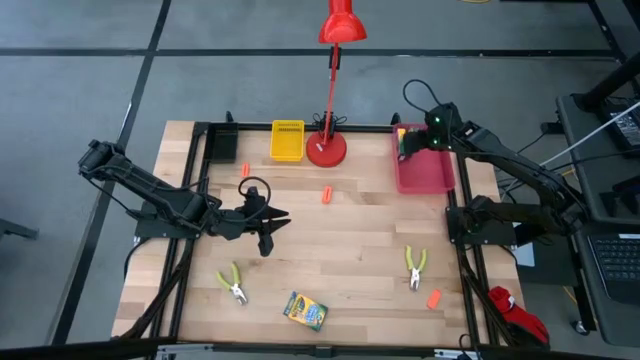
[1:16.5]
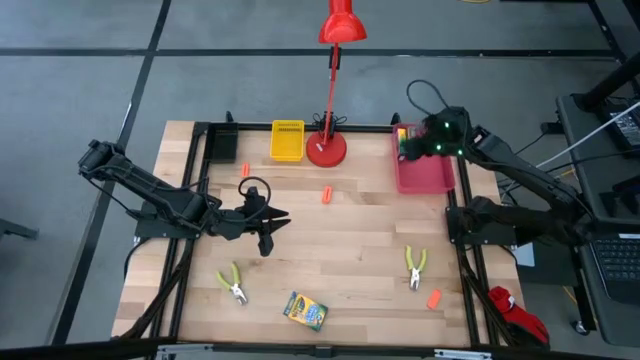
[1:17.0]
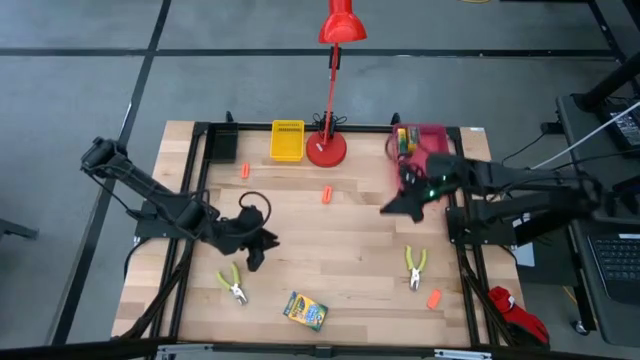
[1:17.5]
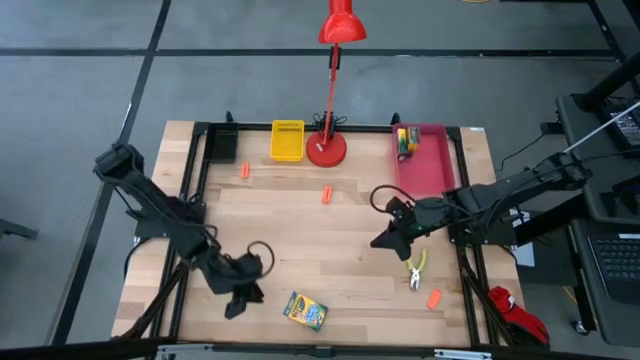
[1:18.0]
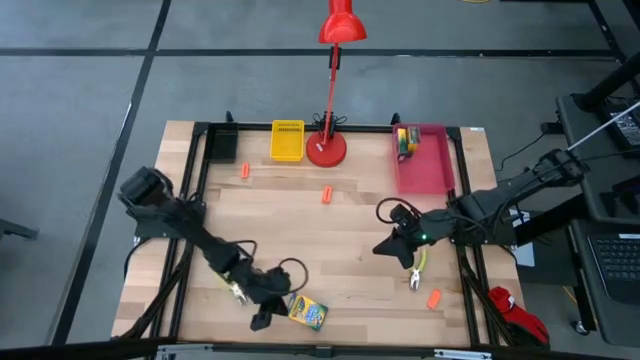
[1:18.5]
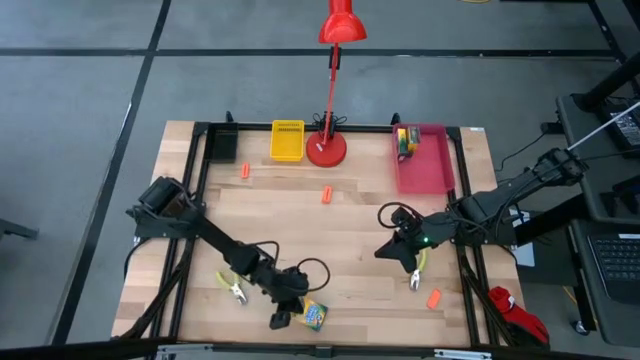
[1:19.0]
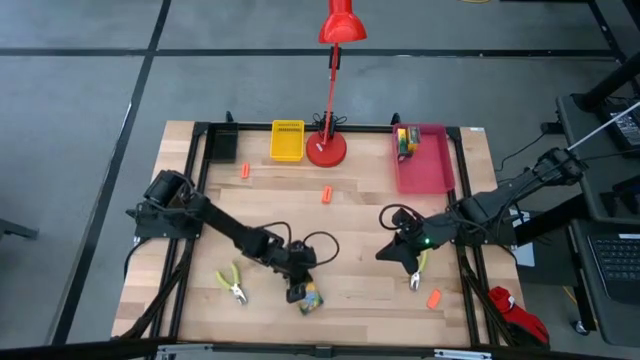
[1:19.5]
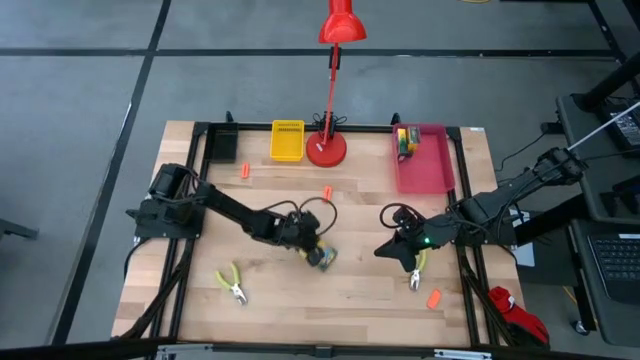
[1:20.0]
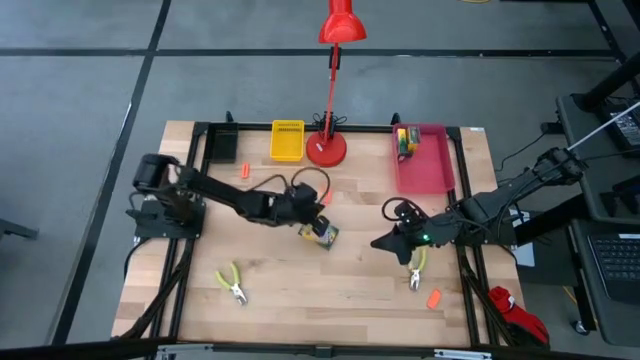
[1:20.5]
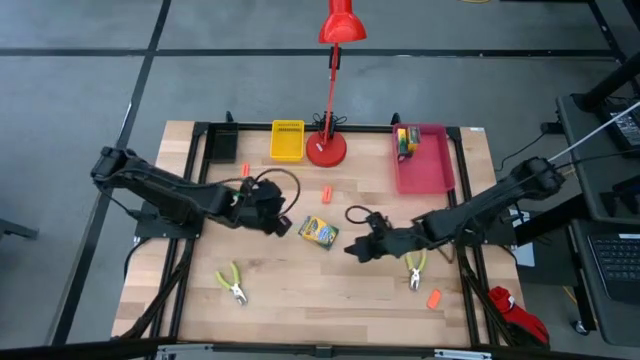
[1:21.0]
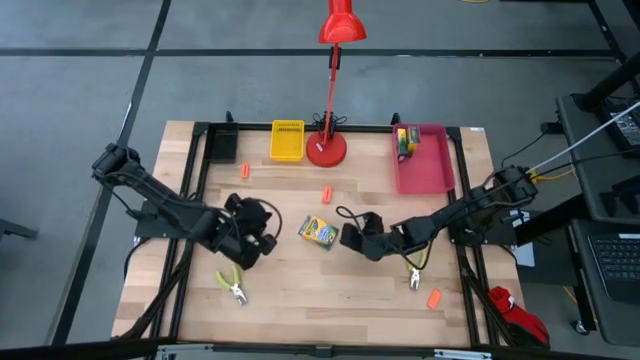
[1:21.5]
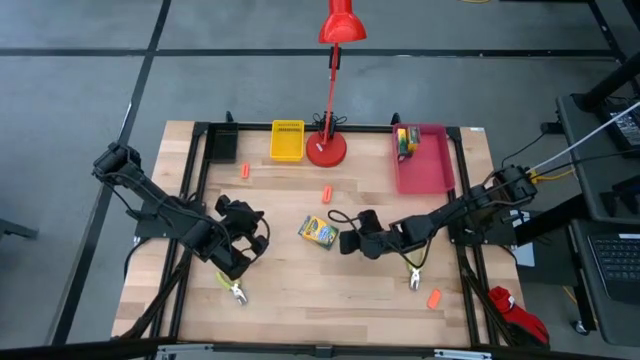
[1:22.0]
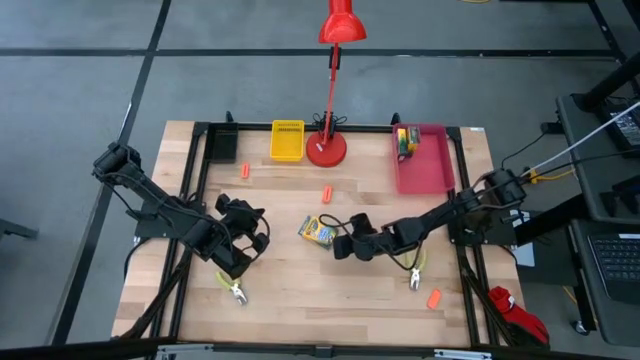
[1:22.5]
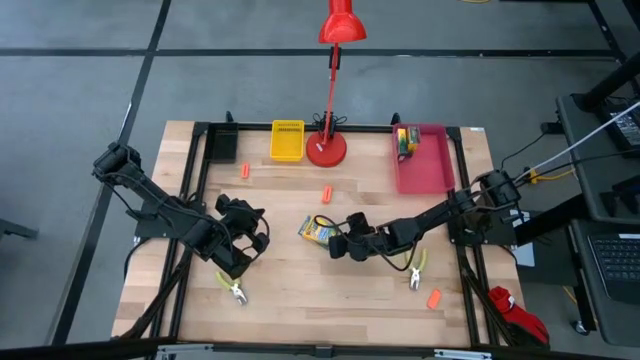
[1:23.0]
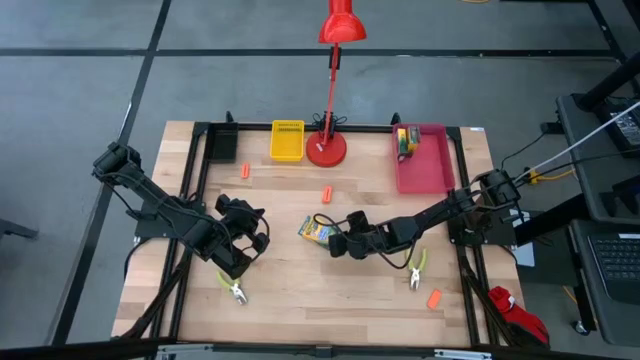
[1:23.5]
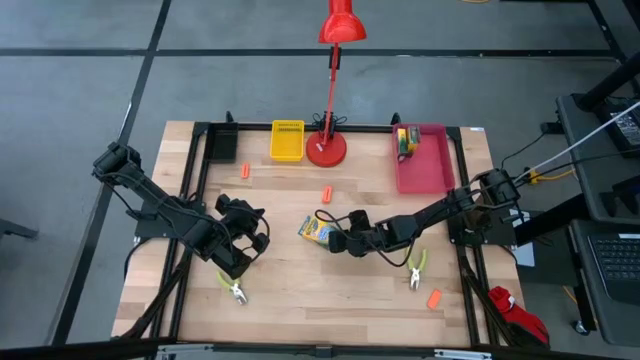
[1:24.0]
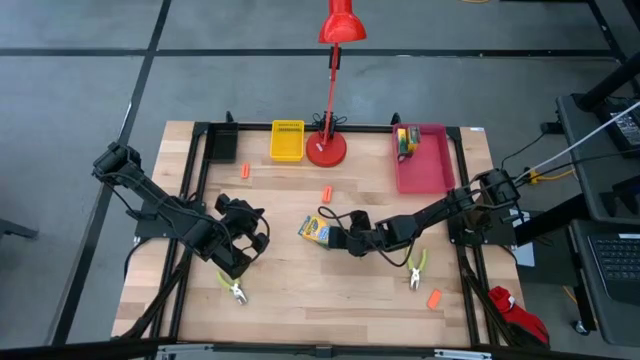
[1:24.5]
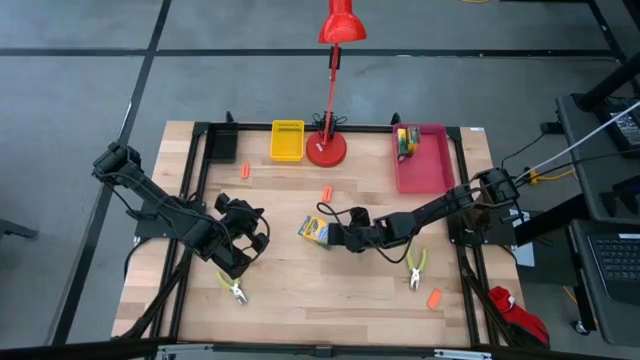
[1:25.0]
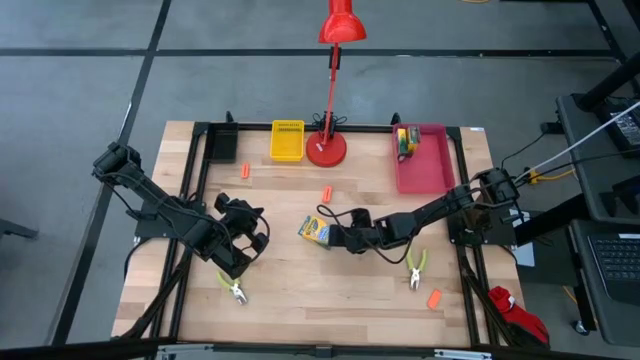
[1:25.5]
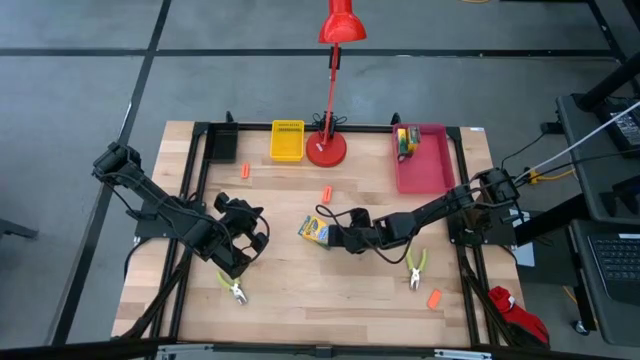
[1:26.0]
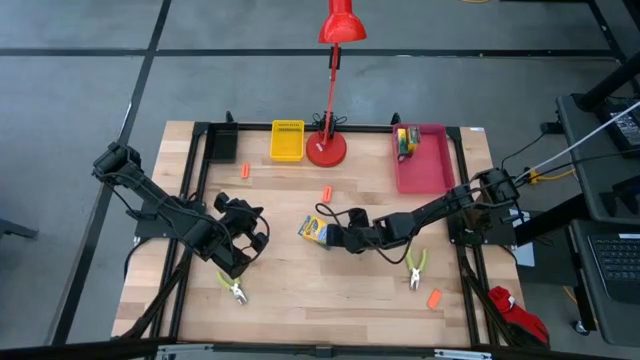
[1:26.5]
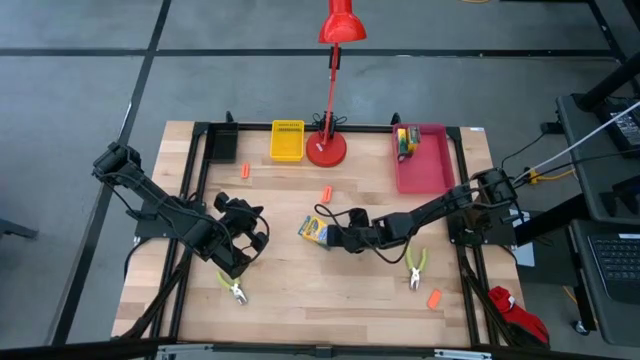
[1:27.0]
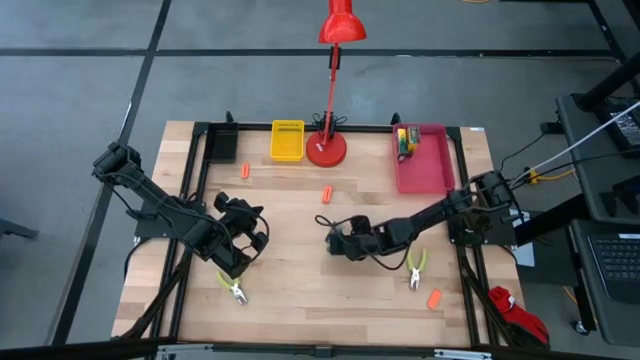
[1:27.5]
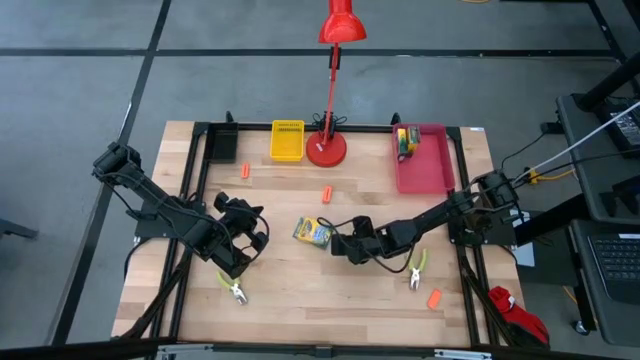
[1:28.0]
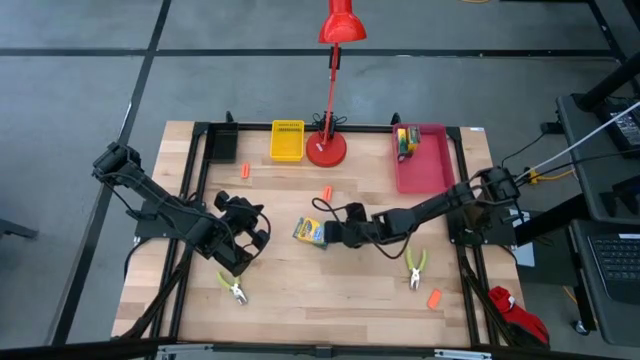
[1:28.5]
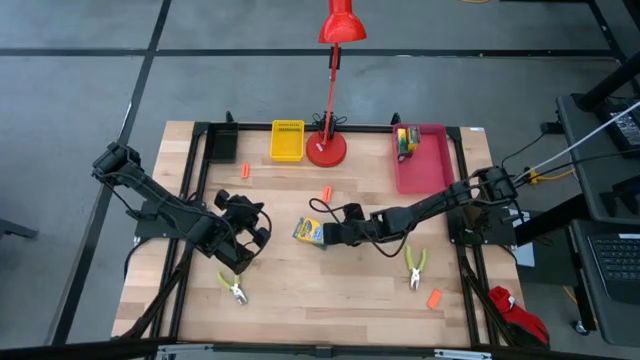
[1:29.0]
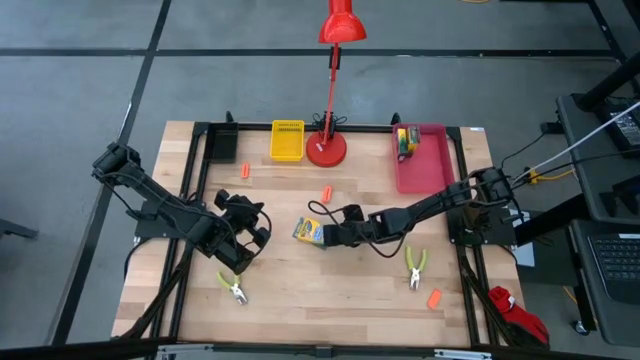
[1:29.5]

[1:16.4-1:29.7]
Task: Pick & Place School Supplies
Put the yellow crayon box into the red bin

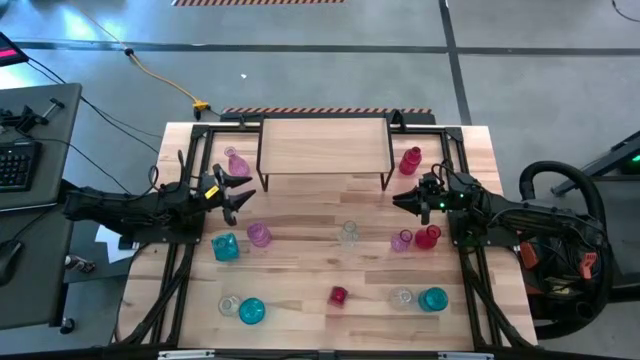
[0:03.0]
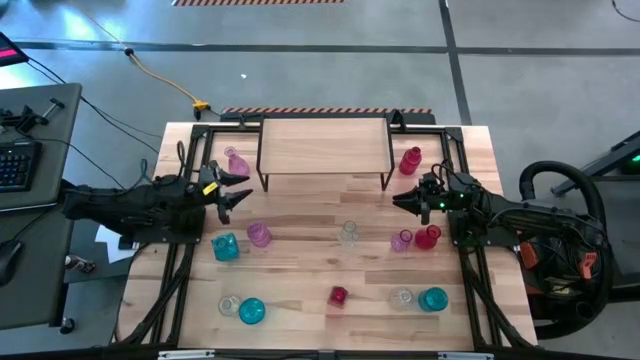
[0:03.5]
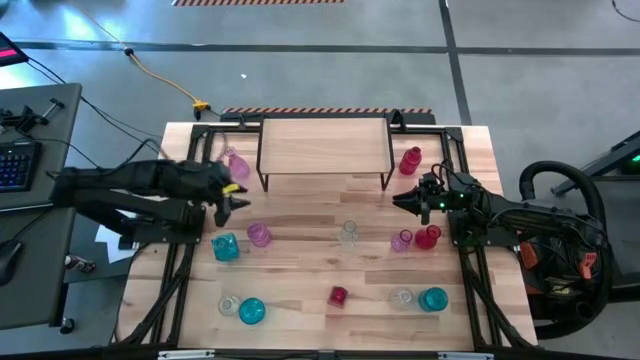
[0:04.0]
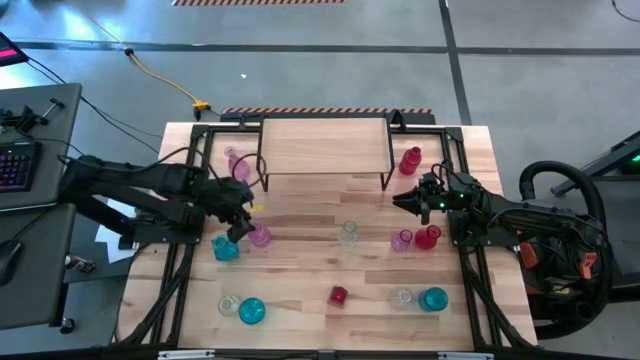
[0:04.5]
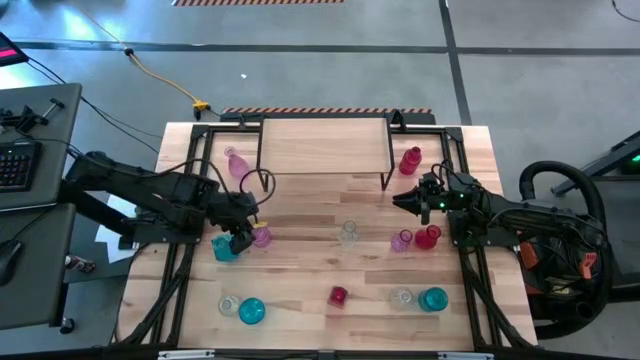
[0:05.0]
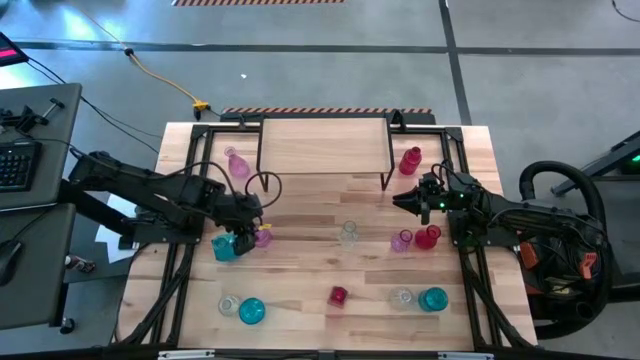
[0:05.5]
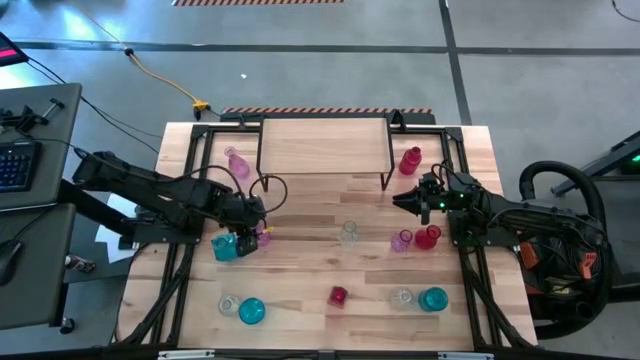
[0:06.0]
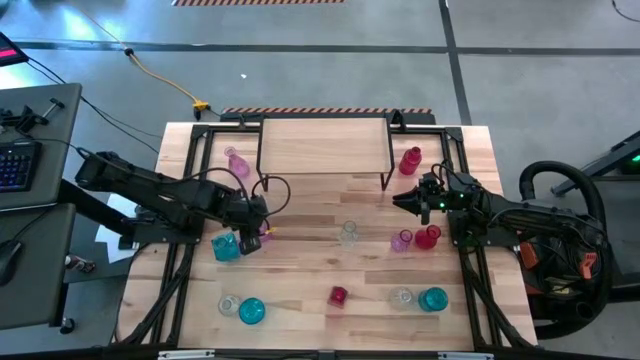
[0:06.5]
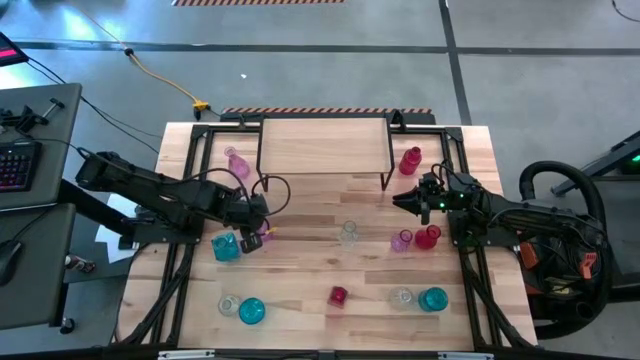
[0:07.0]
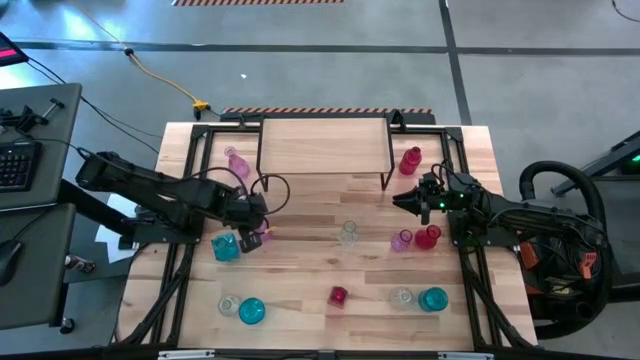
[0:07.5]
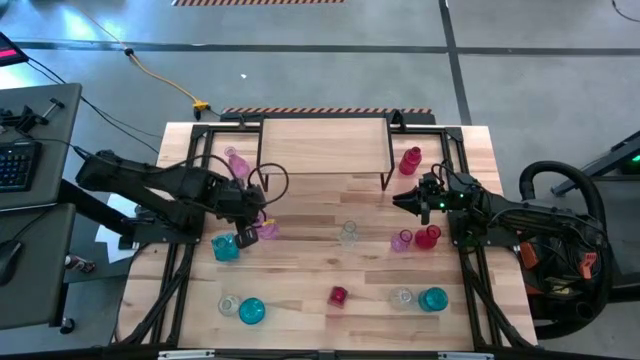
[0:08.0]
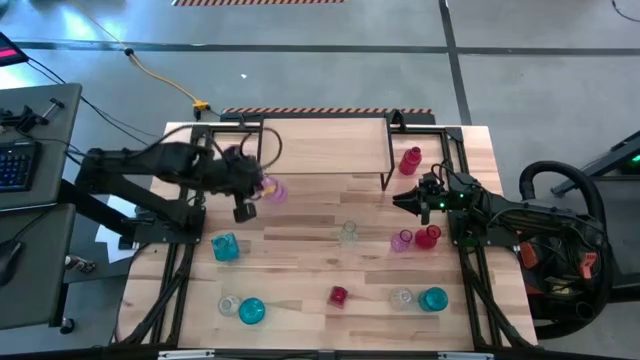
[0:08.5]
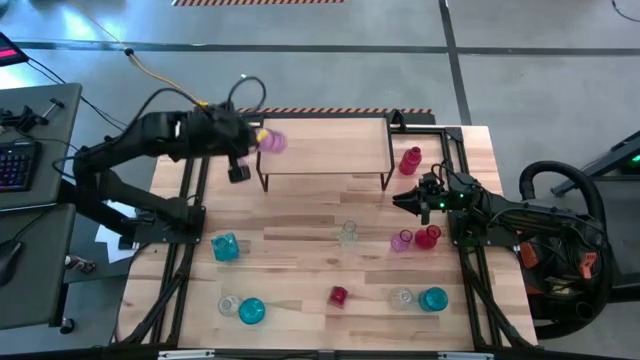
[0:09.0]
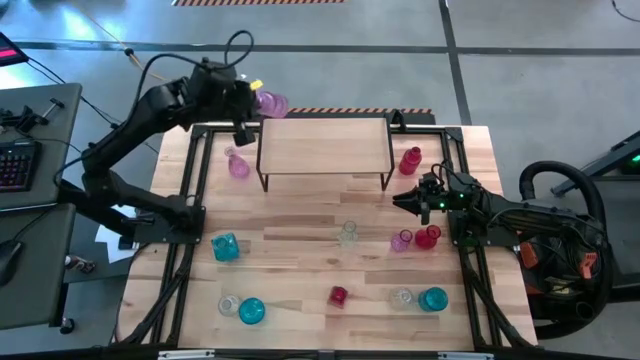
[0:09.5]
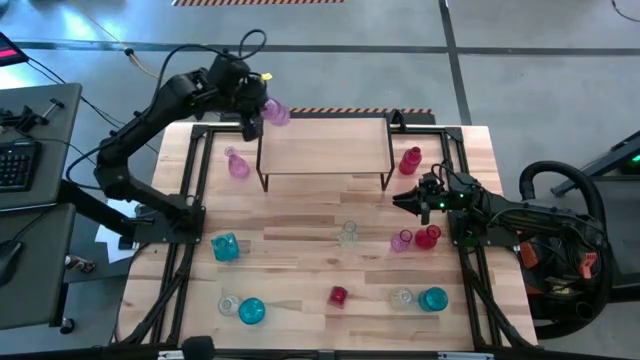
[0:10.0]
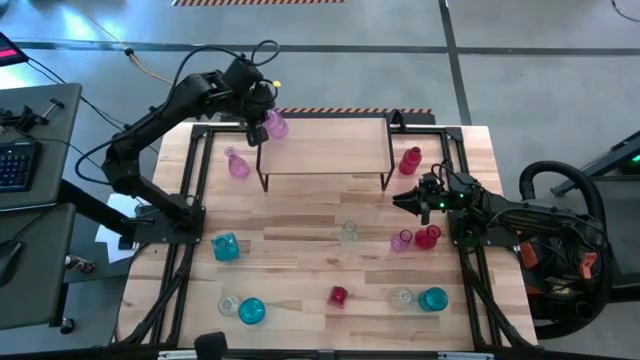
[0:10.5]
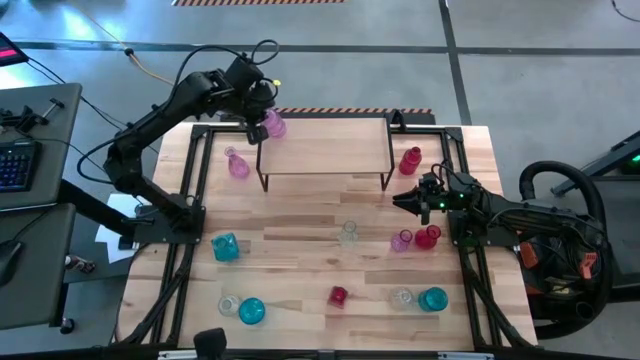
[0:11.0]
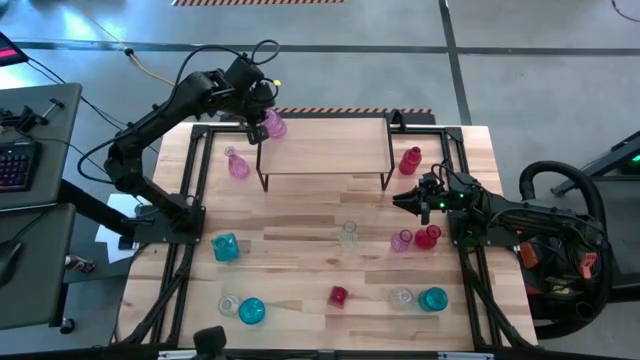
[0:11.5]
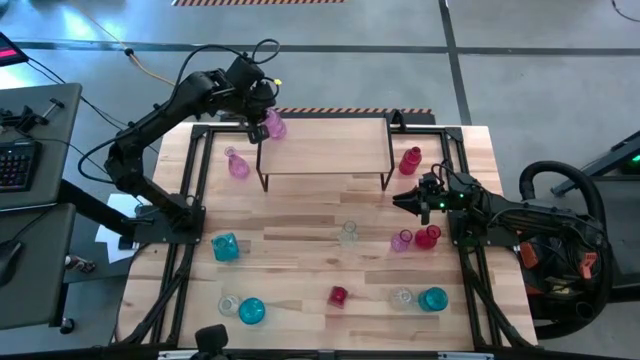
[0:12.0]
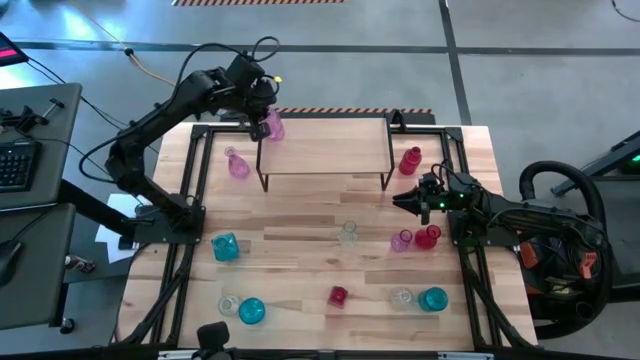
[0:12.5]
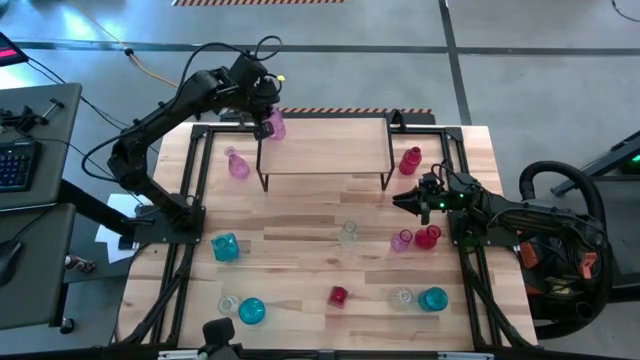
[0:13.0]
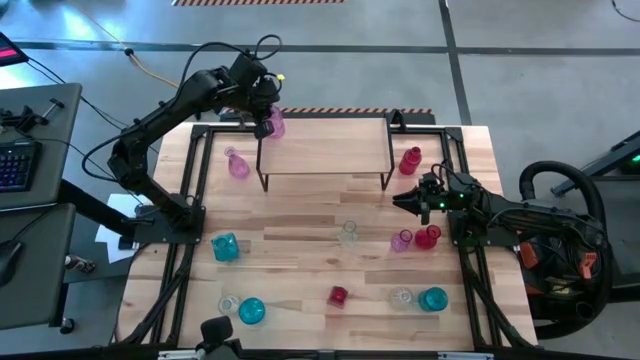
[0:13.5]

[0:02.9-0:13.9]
Task: sort vases onto shelf
Put the bottom left violet vase on the shelf
